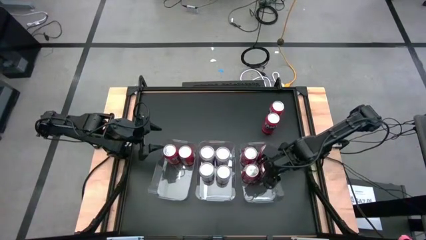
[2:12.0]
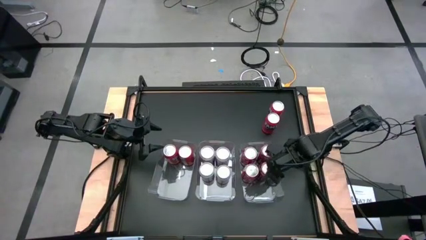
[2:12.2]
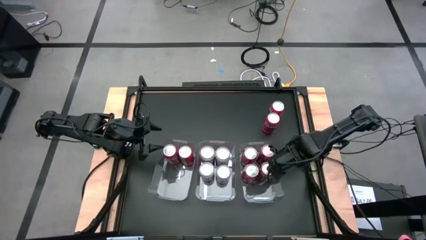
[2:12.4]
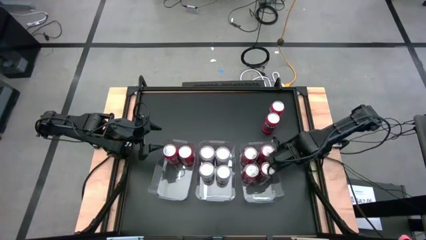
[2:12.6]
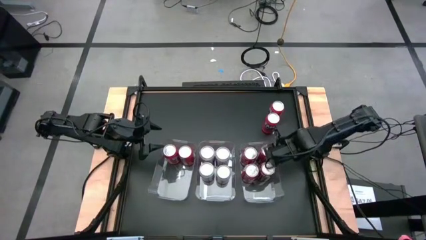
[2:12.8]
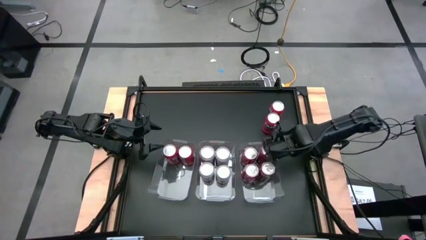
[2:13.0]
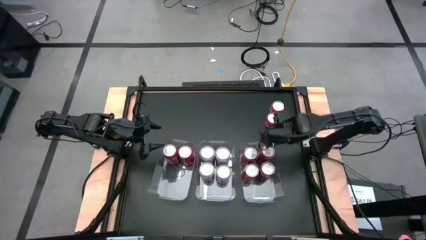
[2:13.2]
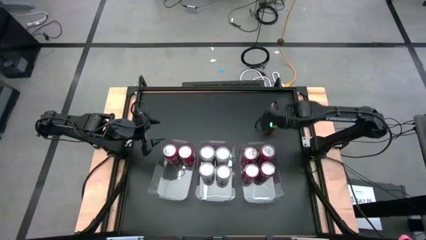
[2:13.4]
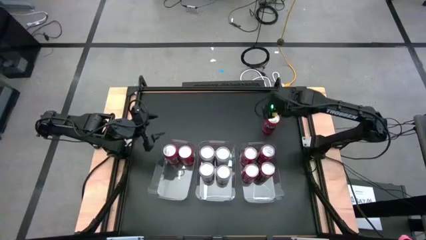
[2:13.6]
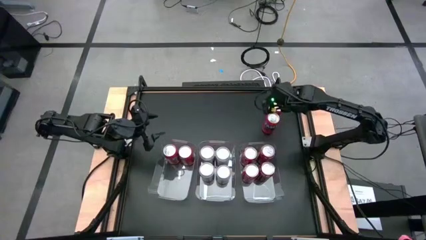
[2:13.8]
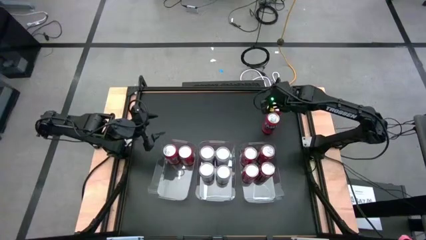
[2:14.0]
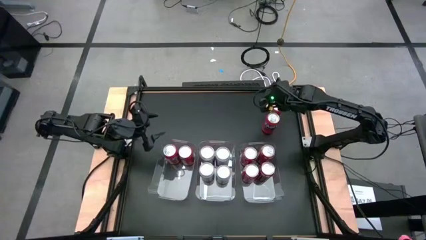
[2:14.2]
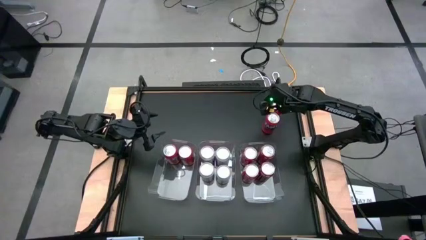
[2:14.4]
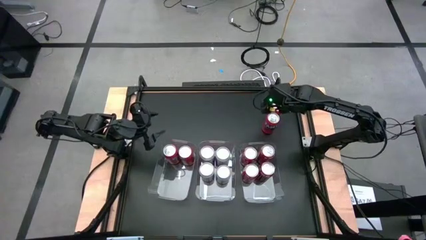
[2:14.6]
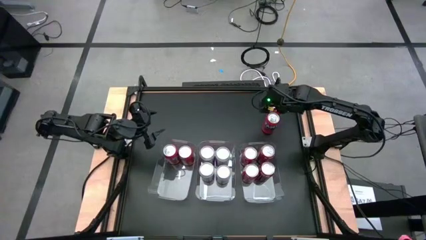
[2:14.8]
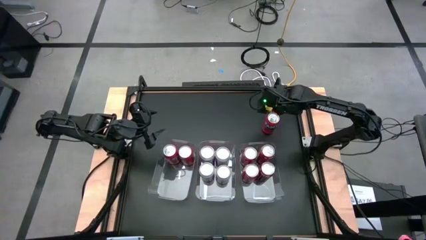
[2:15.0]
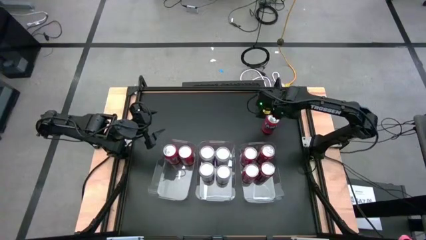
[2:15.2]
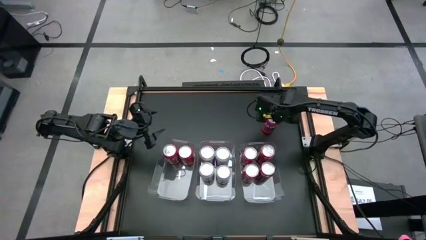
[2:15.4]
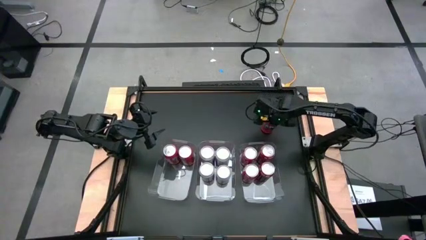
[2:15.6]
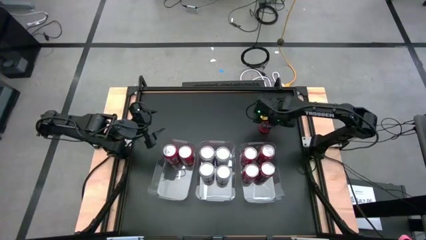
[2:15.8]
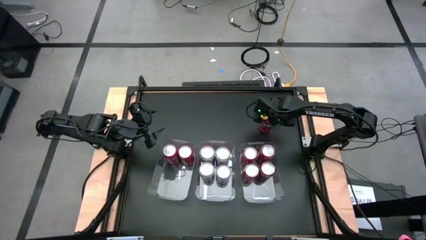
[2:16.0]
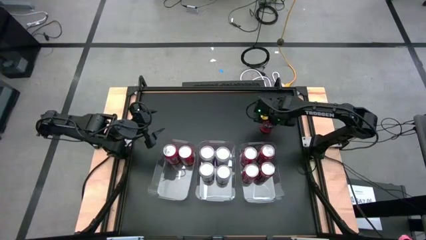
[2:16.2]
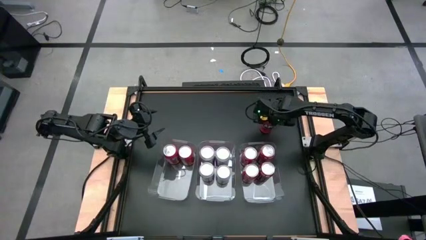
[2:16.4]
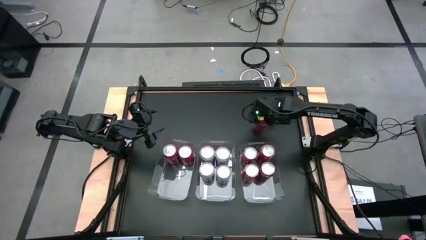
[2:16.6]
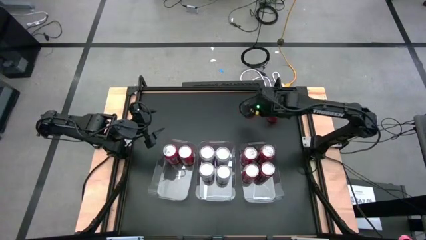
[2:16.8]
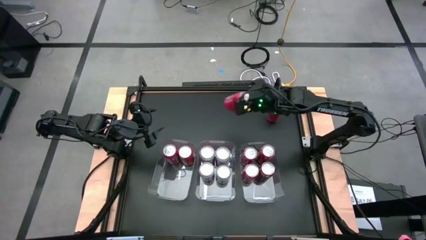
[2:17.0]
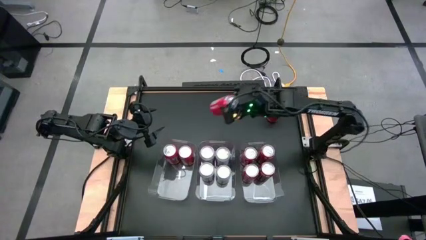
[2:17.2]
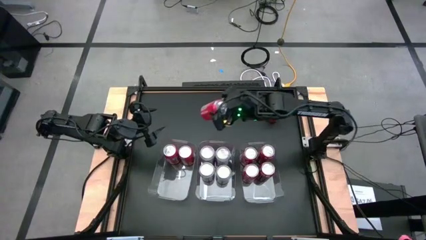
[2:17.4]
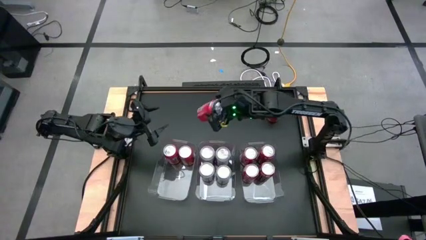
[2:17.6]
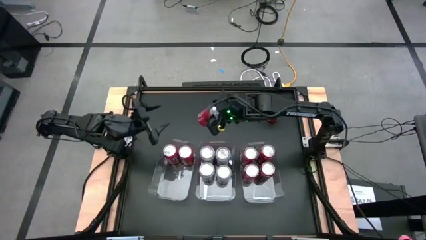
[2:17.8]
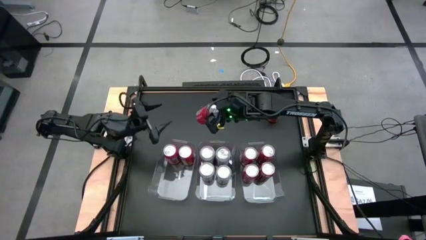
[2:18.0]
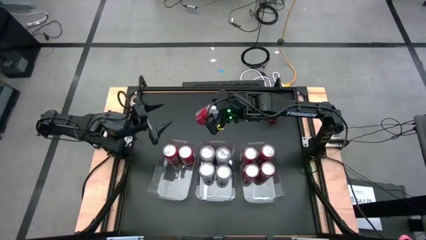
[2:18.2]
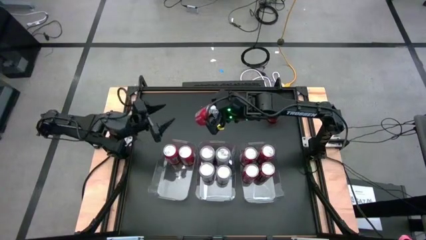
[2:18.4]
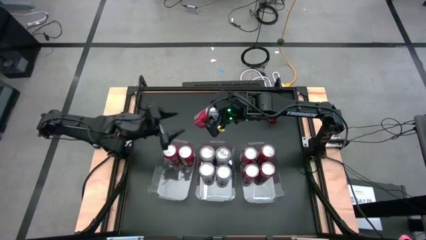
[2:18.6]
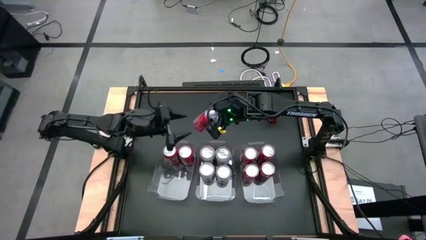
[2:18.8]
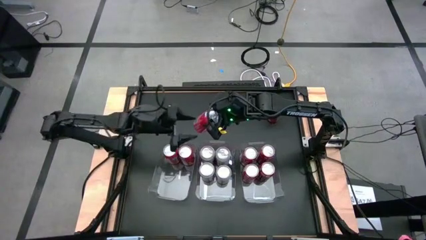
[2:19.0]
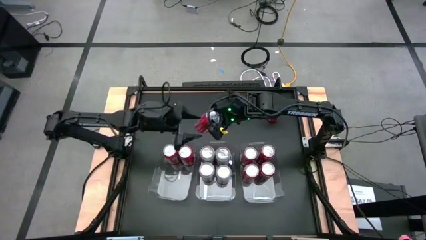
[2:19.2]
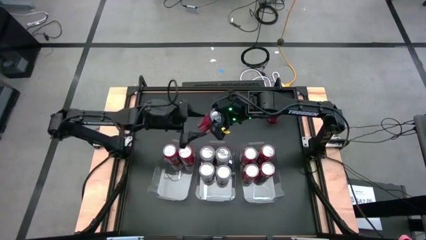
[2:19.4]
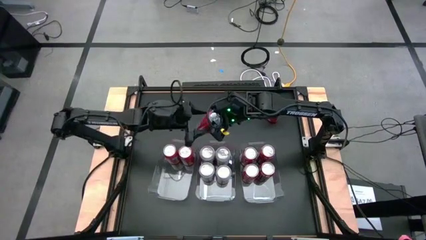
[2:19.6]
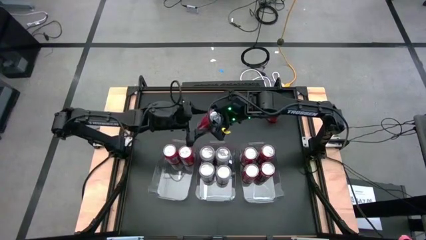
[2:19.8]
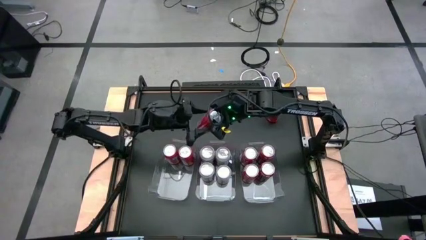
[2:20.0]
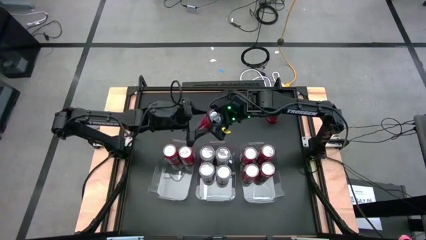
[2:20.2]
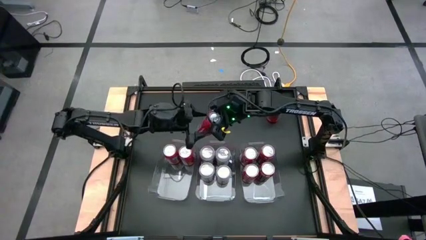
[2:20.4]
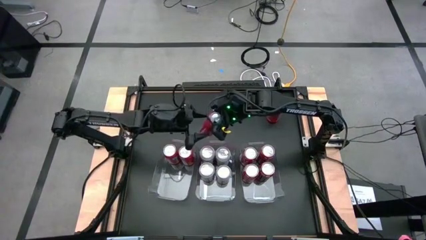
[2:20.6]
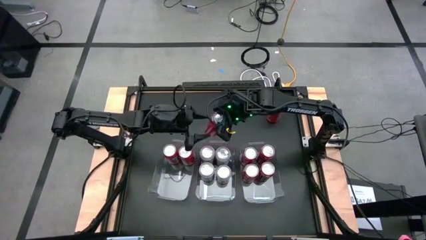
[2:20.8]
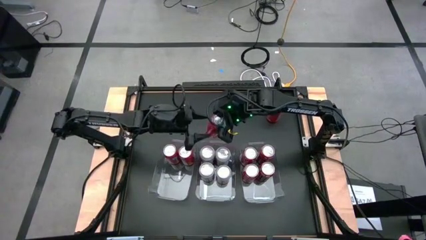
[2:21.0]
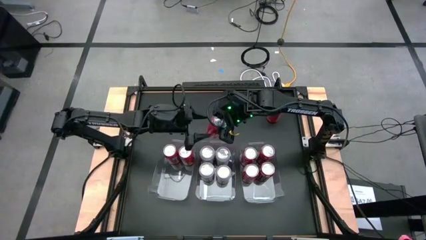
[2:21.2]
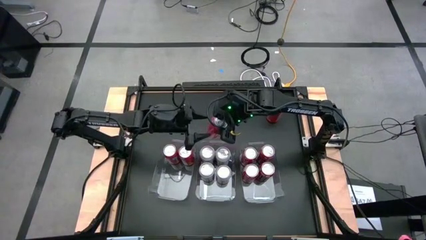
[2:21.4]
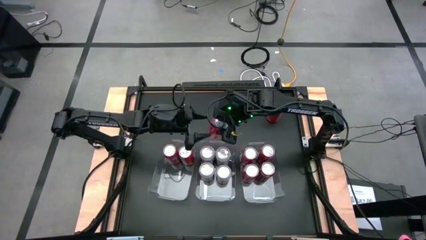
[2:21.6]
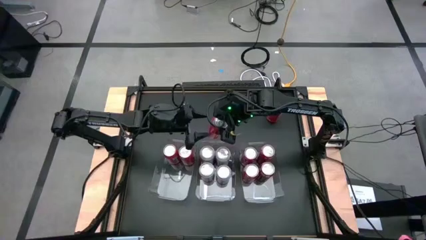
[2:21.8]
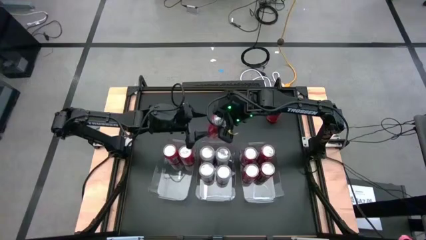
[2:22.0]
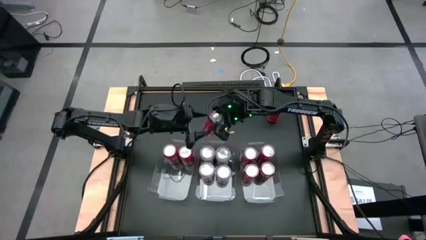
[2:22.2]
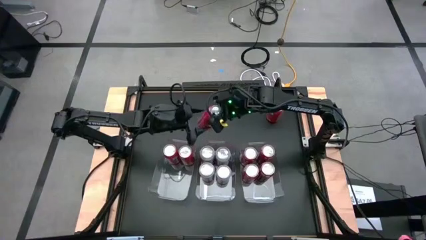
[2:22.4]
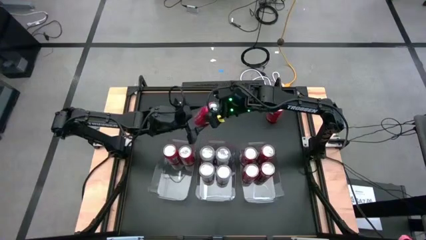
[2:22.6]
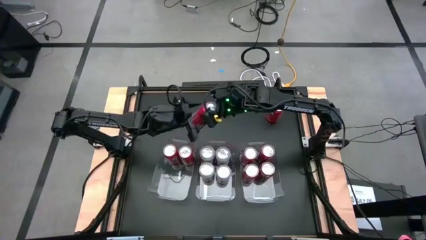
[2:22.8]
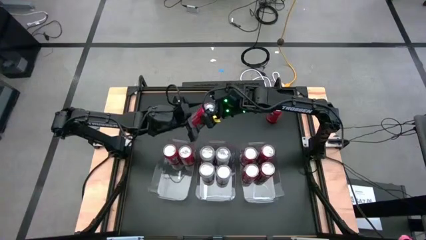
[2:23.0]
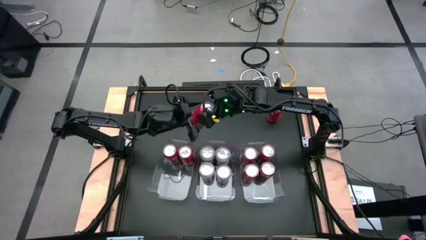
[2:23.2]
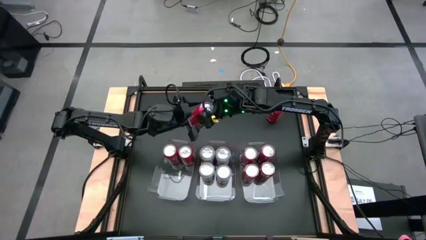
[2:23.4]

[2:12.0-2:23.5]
Task: Sort soda cans
Put the orange soda can into the left transparent bin

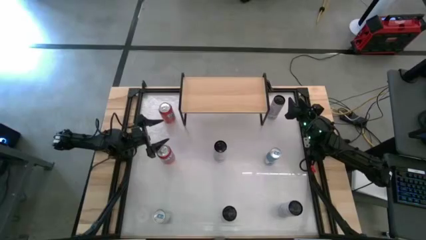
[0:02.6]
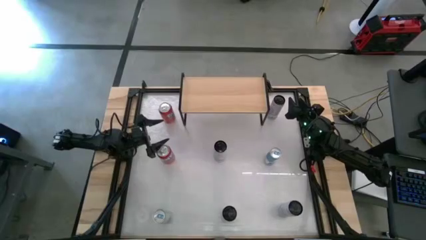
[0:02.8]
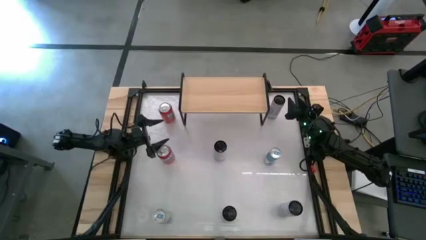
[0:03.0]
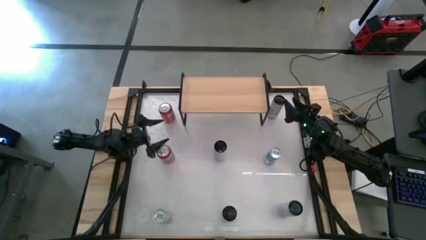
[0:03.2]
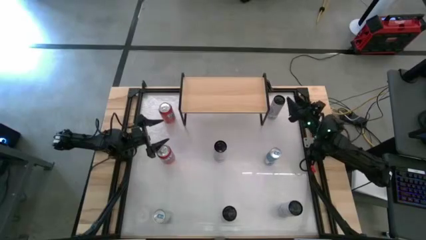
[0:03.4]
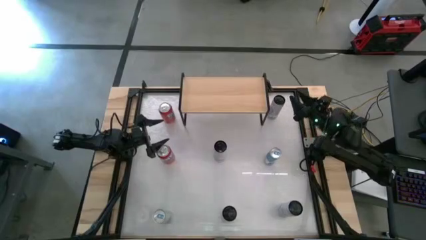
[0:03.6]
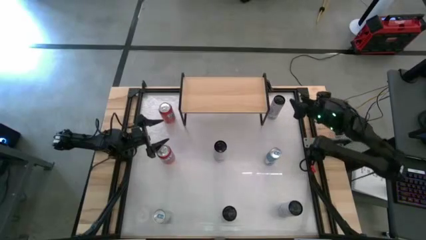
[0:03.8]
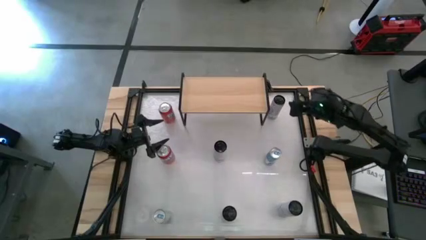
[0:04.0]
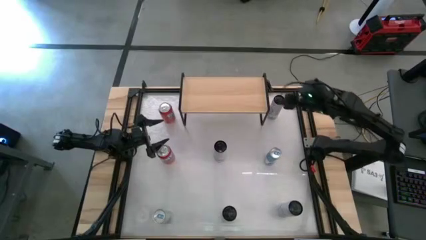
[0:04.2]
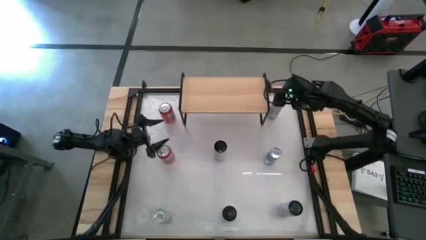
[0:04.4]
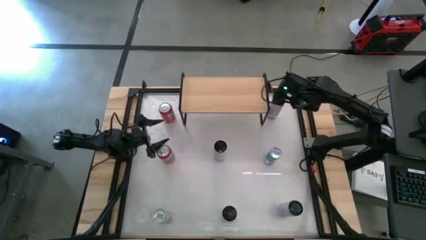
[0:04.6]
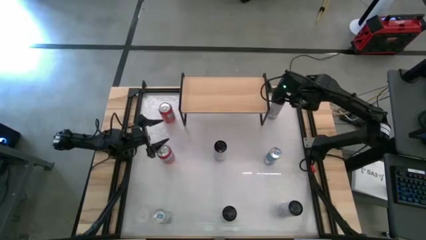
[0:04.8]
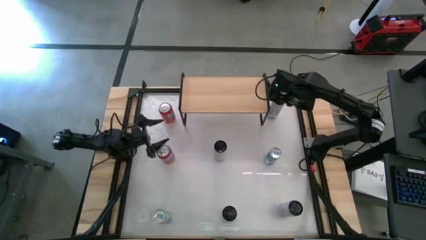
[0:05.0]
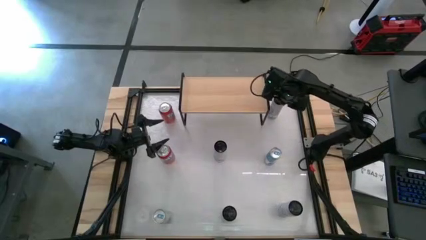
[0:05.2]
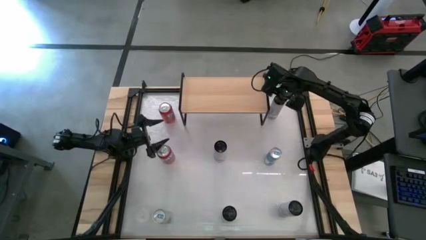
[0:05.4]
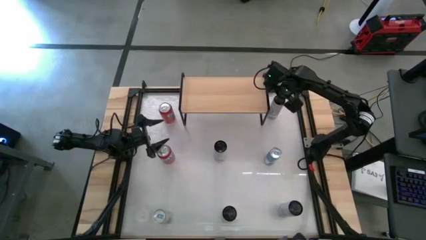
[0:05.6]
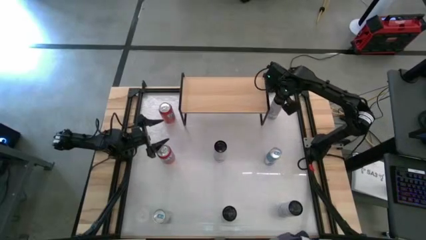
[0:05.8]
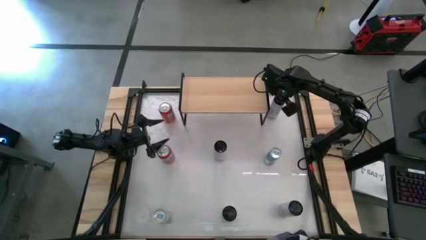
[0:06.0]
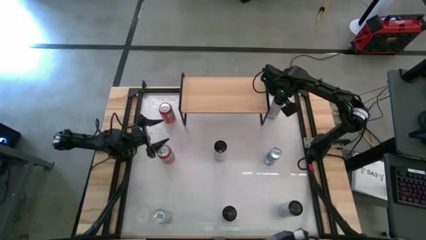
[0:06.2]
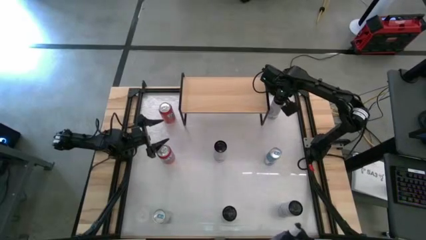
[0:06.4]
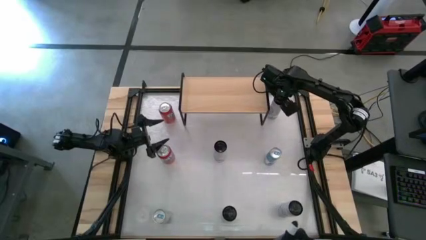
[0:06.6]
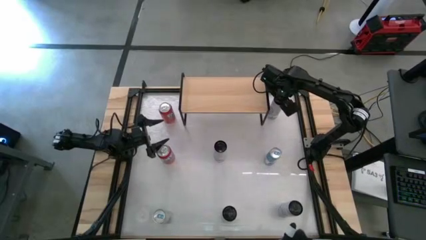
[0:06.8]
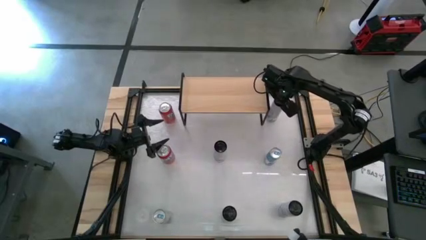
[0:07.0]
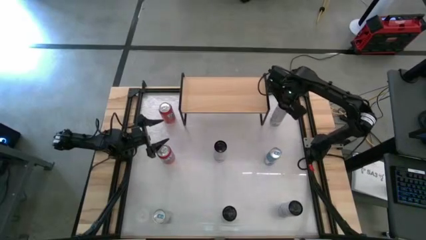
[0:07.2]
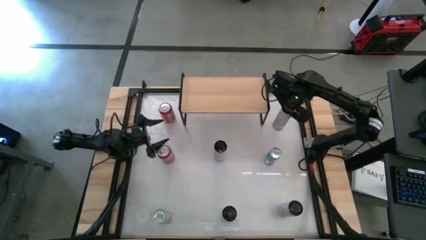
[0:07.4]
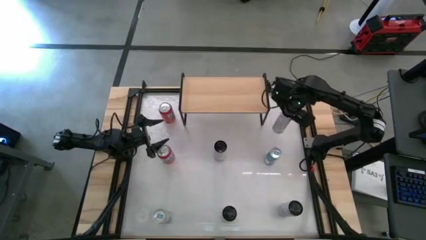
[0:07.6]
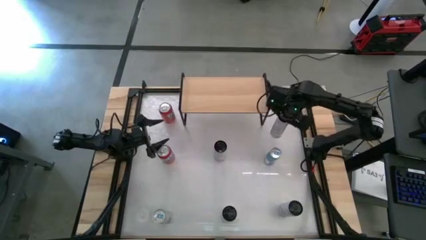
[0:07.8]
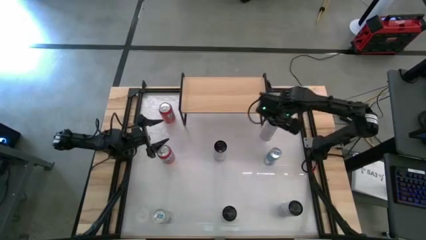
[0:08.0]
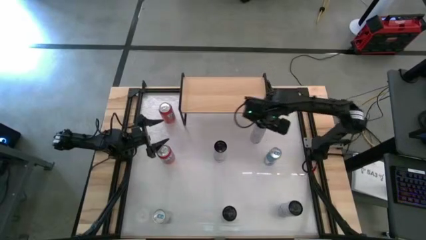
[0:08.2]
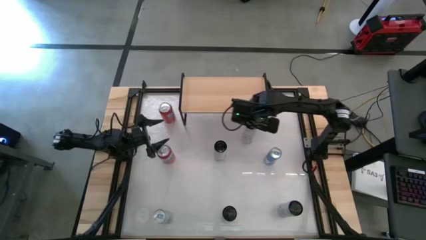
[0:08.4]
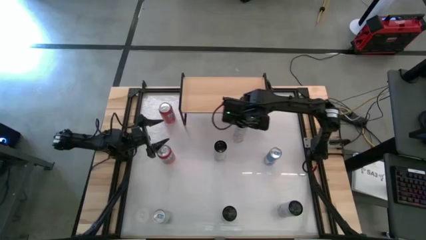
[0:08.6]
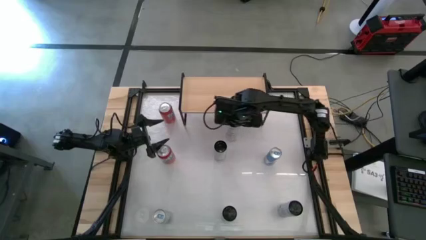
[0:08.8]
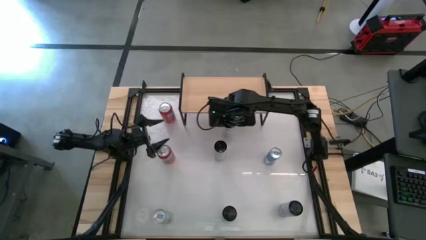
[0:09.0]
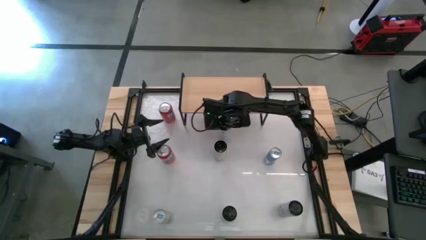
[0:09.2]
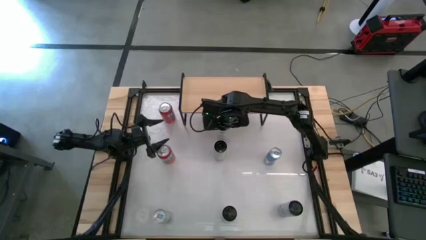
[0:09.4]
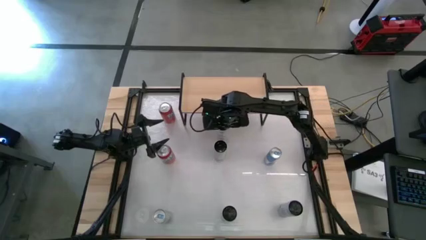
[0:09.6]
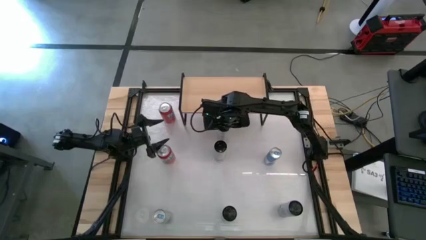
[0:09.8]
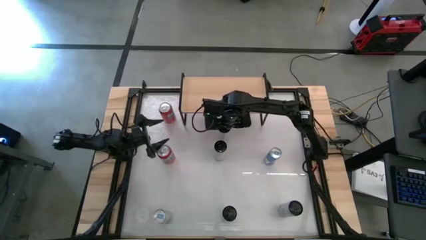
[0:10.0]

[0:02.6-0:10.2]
Task: Place canned beverage on shelf
Move the top white yellow soda can to the center of the table
